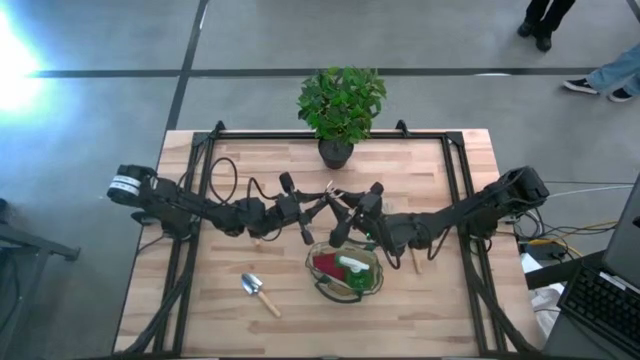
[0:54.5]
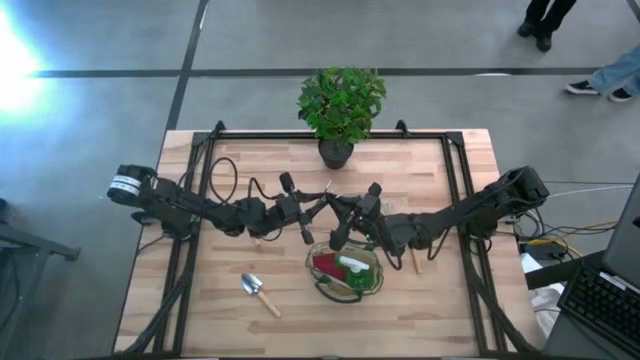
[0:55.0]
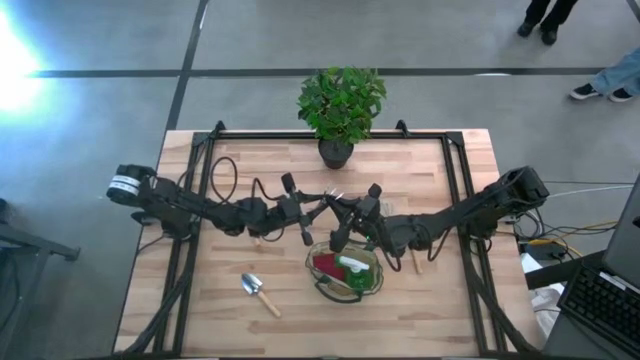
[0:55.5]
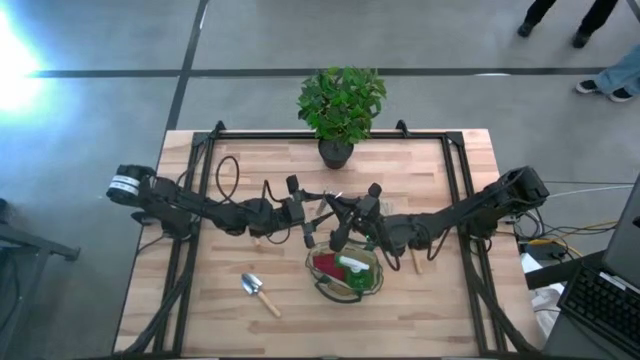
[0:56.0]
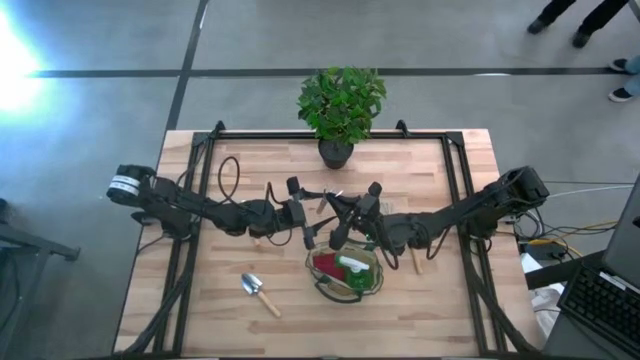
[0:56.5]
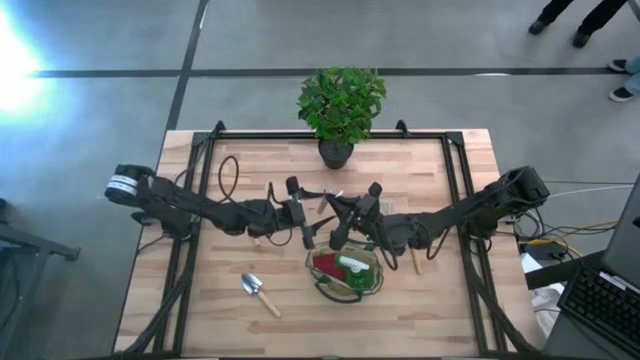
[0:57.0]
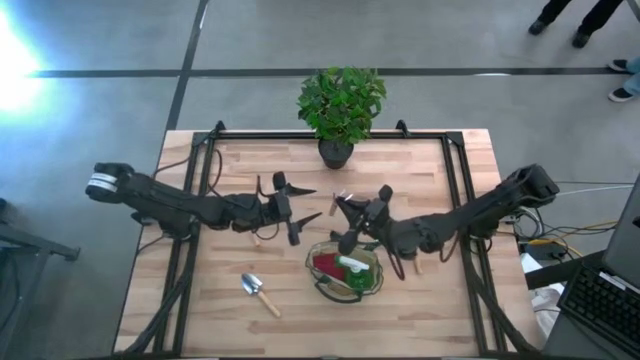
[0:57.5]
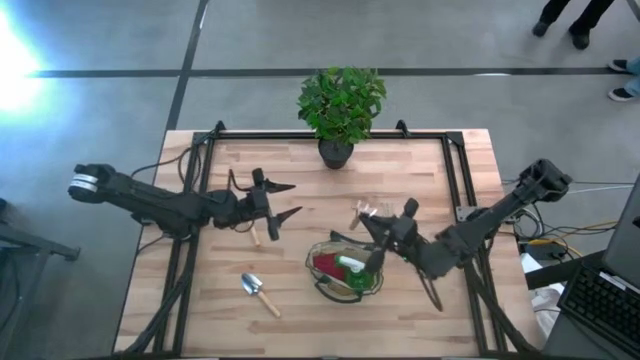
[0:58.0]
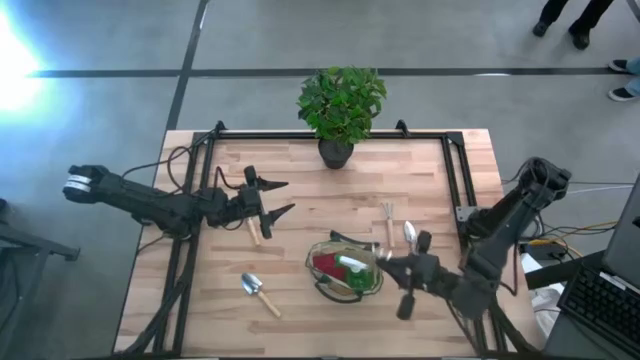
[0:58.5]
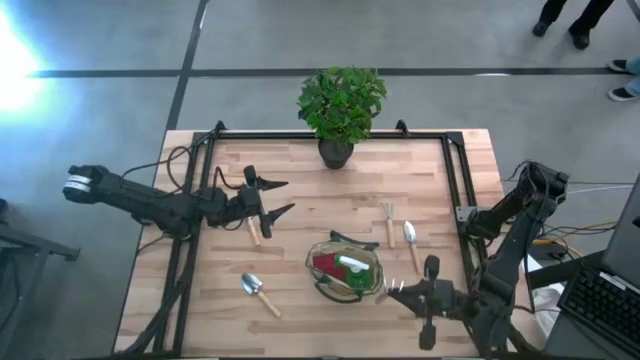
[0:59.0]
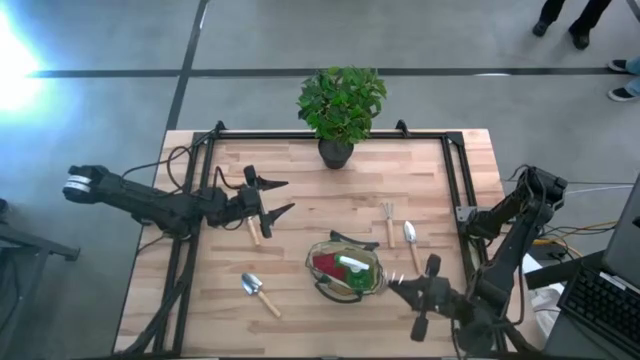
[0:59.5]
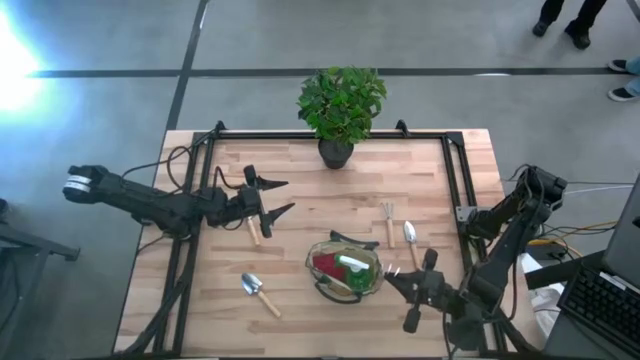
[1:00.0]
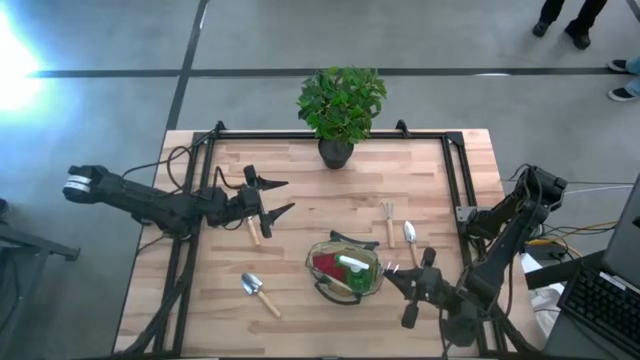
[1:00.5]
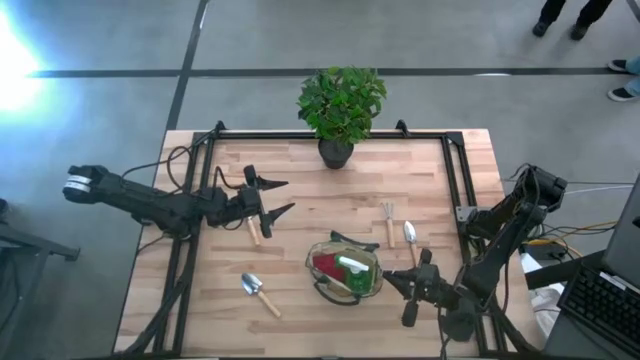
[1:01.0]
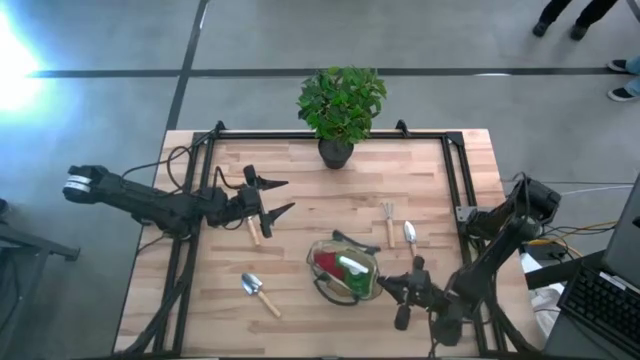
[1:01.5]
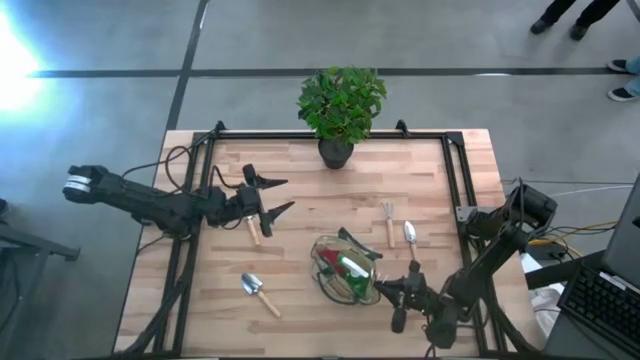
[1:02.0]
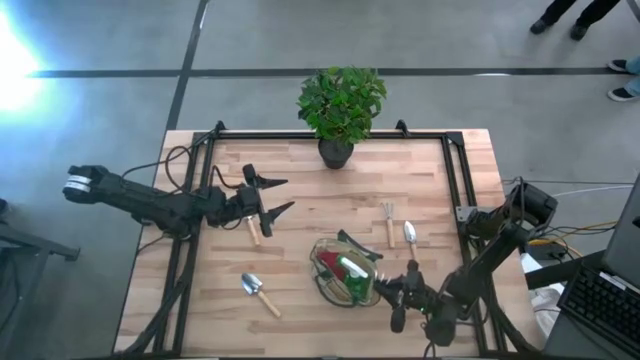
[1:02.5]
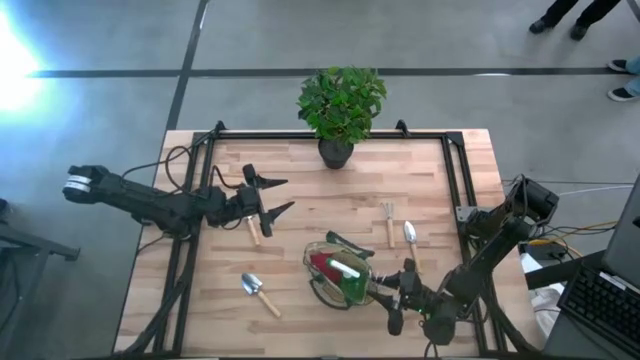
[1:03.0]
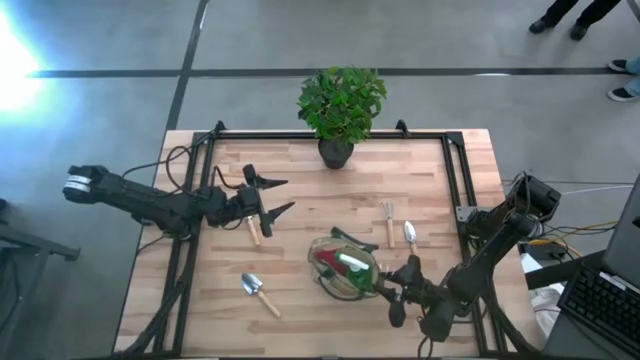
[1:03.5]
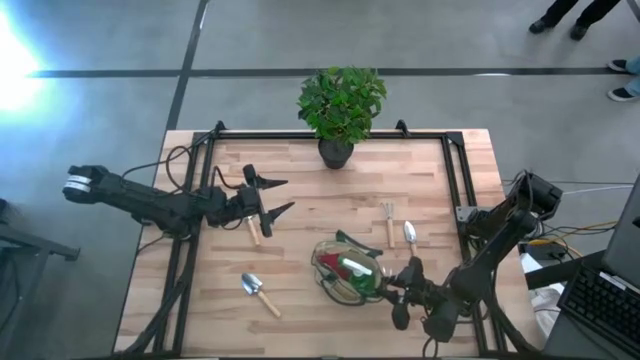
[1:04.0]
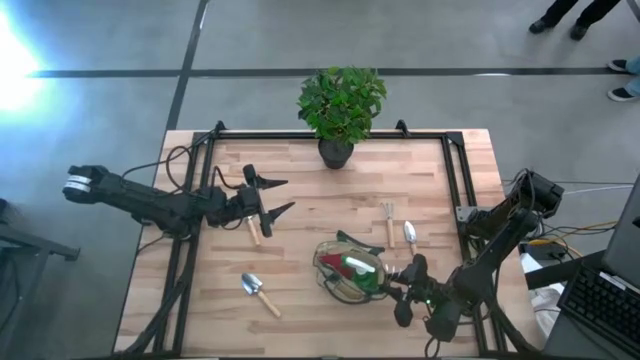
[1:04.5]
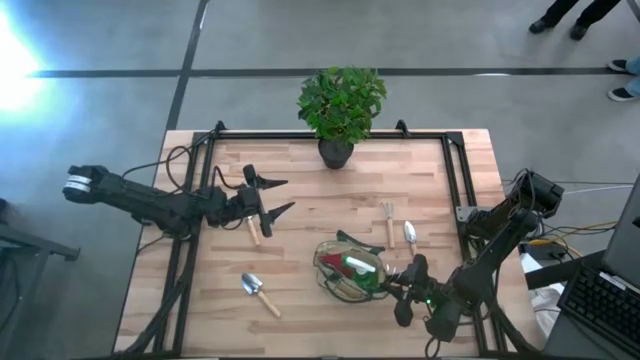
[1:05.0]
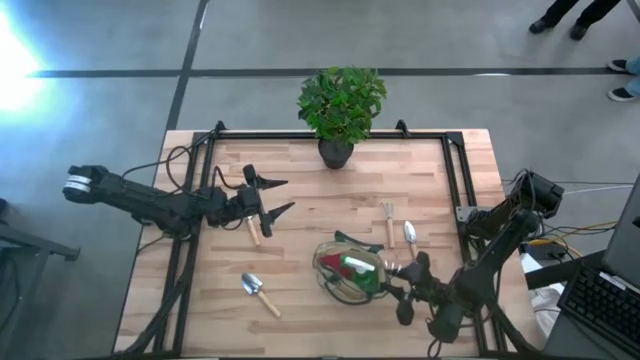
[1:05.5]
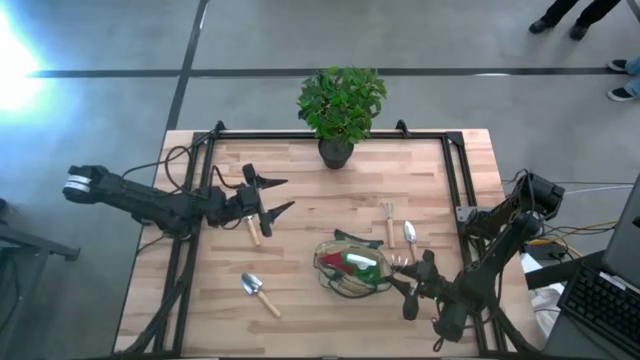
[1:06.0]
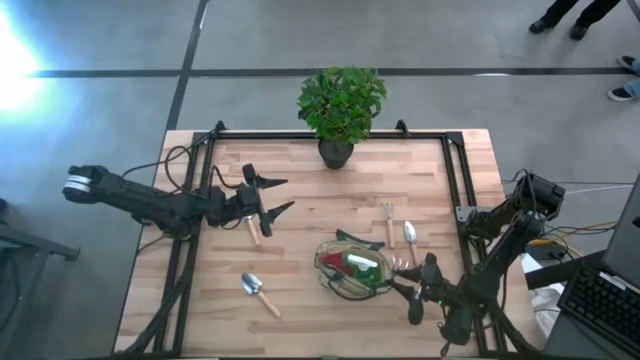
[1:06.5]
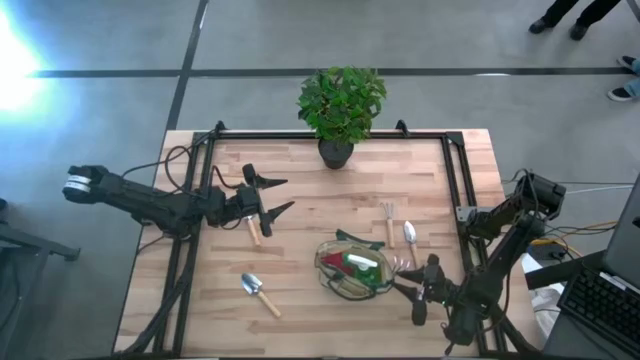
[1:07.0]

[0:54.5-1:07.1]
Task: Pick & Place Garden tools in Gardening bag
Put the left brown hand rake into the green gardening bag

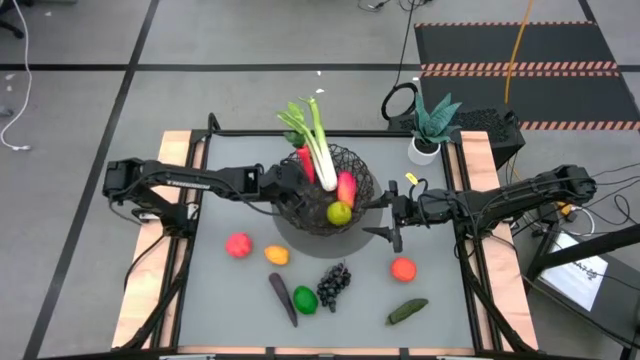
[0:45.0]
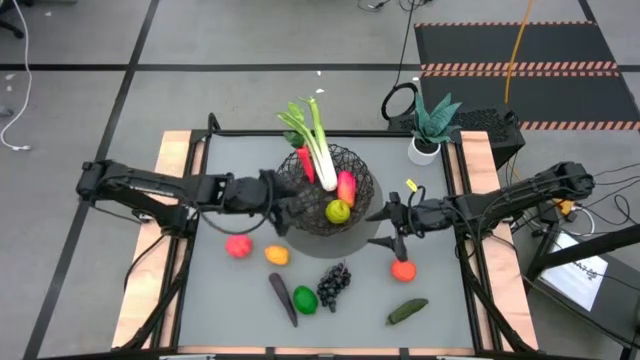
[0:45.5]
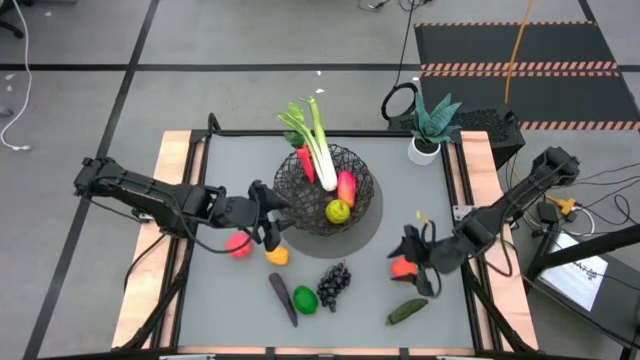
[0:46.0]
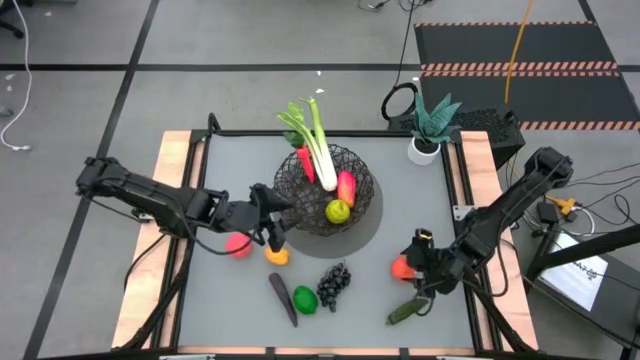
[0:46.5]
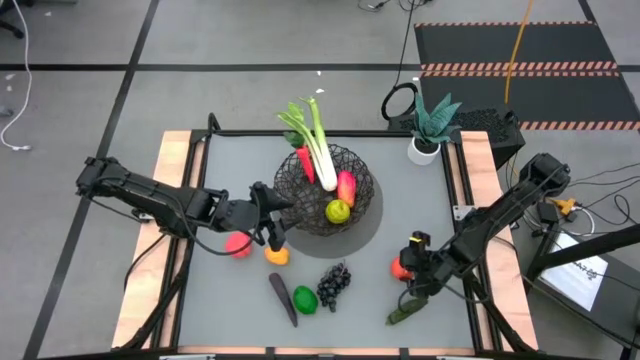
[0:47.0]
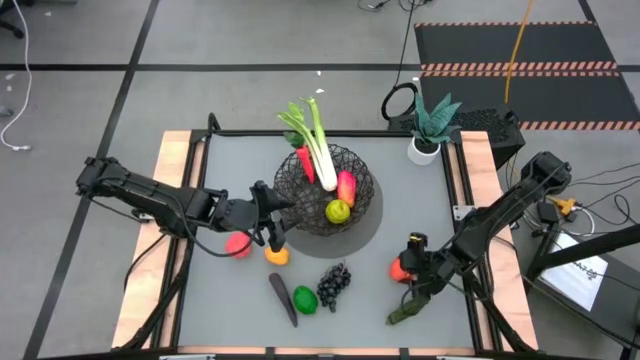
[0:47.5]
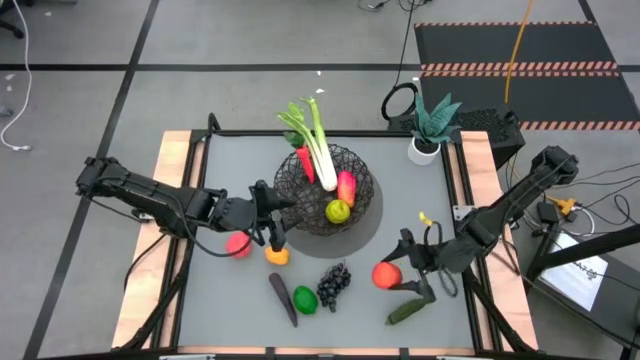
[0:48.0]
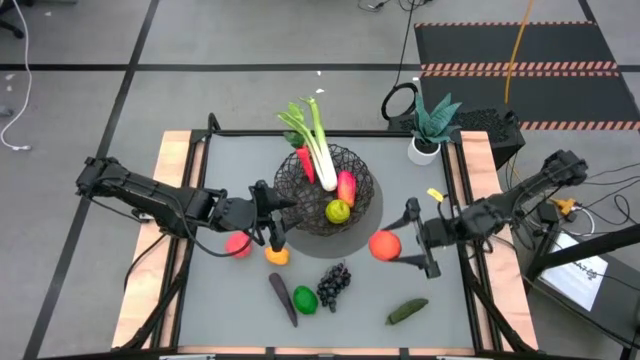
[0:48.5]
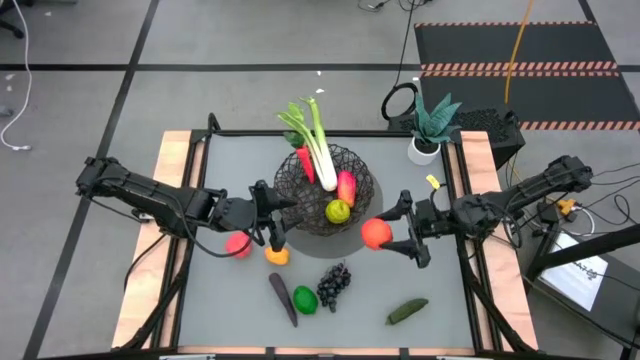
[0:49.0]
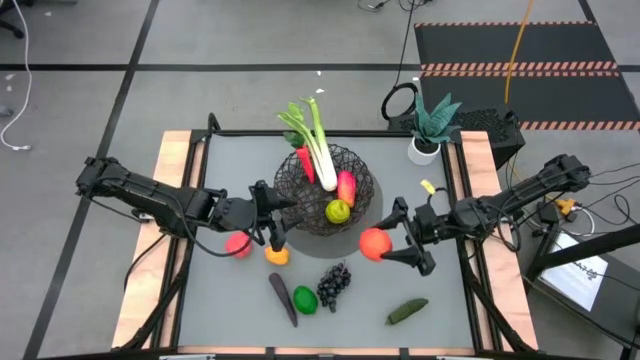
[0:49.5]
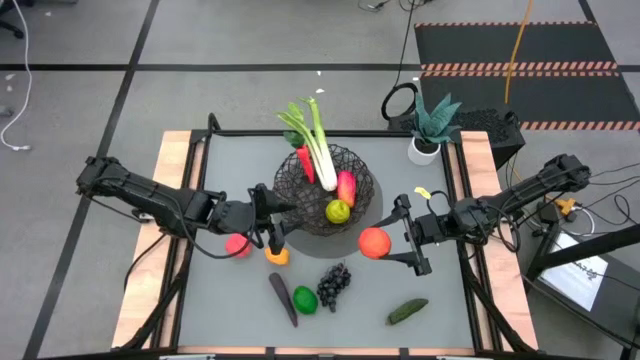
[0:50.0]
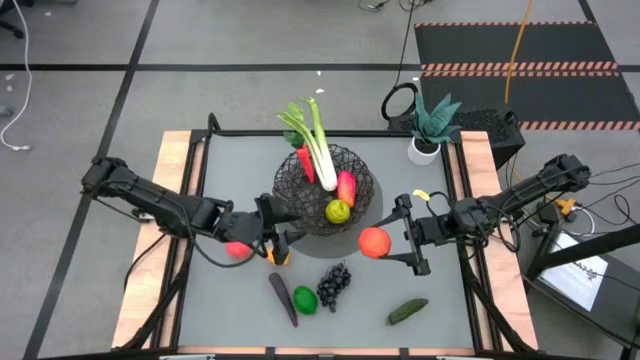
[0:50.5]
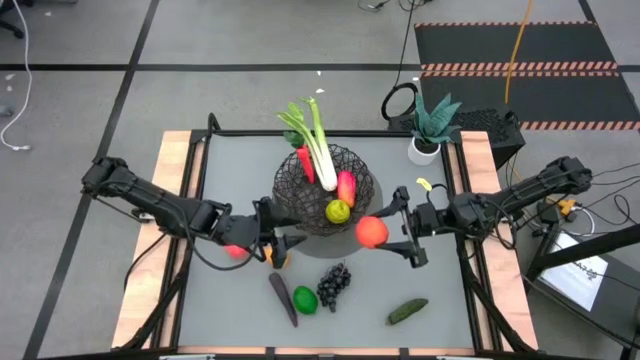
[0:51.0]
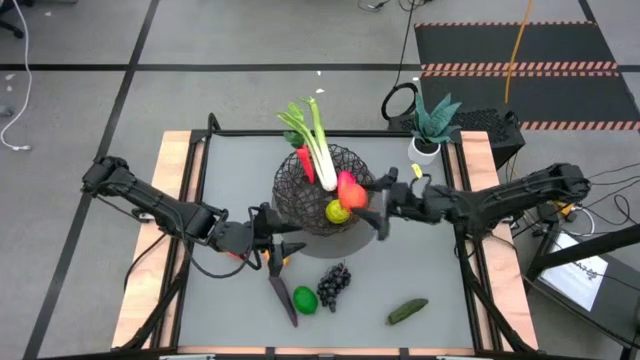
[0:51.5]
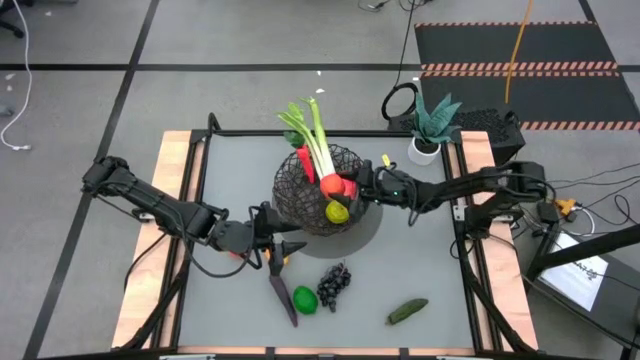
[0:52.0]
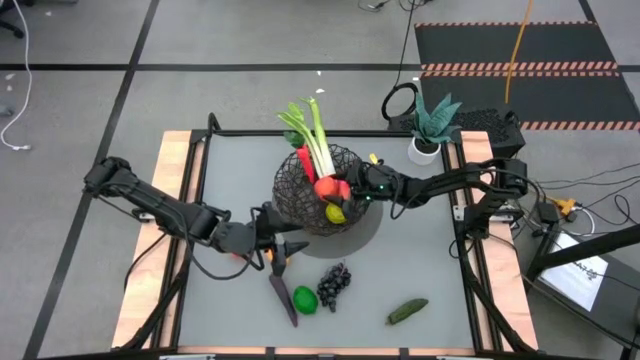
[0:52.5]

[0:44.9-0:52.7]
Task: Build produce basket
Put the orange into the black woven basket
